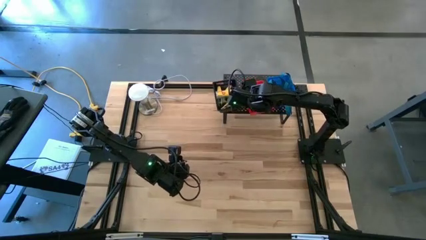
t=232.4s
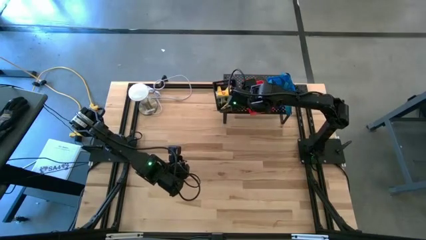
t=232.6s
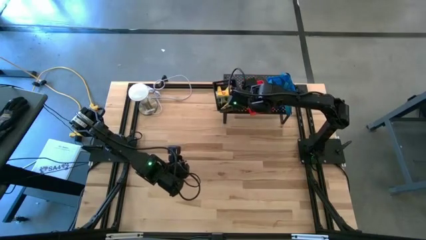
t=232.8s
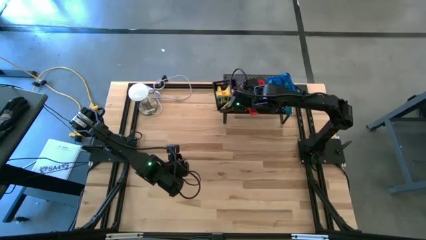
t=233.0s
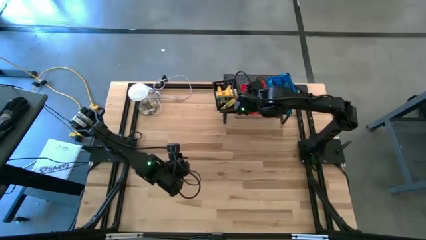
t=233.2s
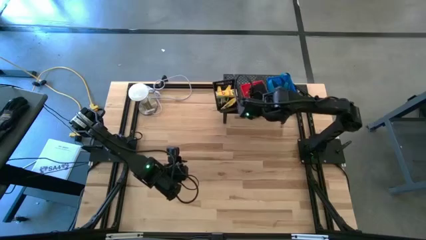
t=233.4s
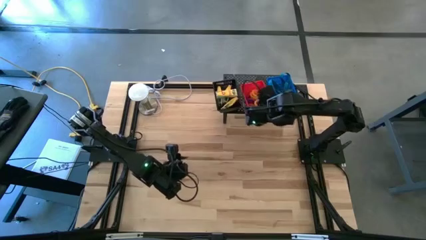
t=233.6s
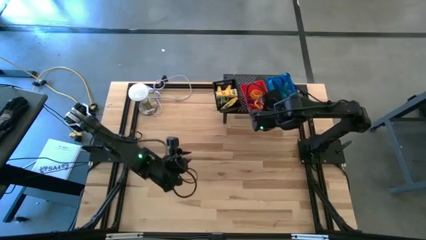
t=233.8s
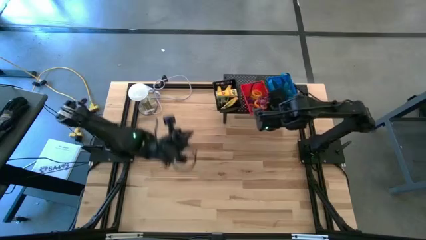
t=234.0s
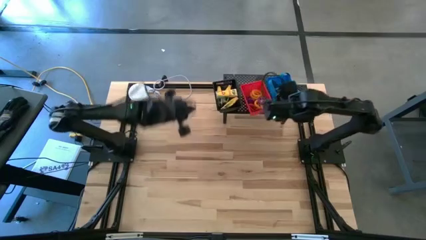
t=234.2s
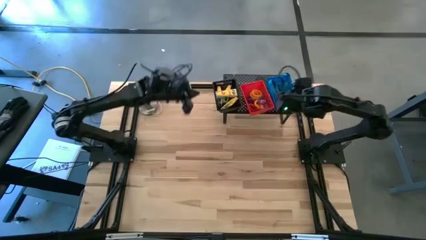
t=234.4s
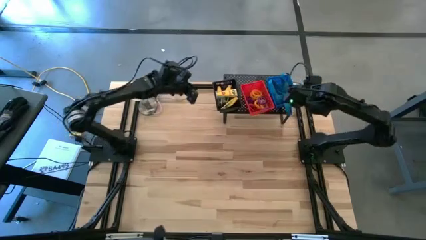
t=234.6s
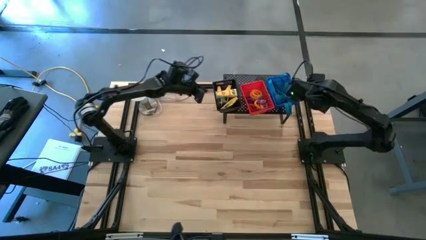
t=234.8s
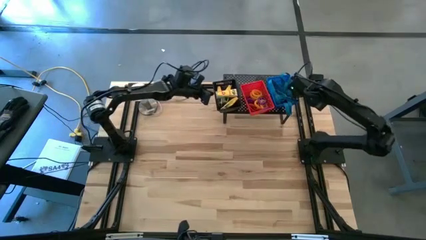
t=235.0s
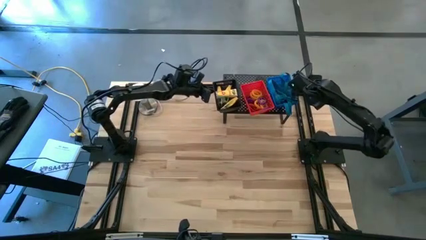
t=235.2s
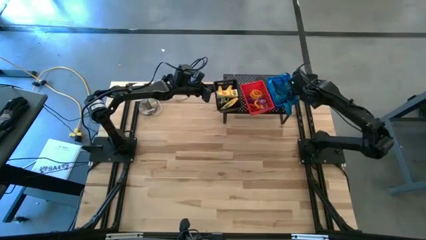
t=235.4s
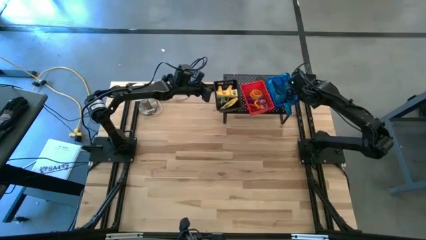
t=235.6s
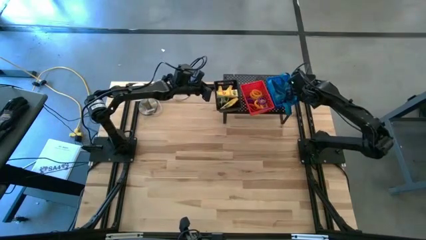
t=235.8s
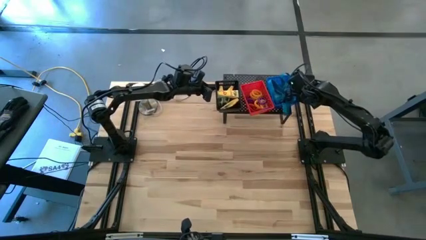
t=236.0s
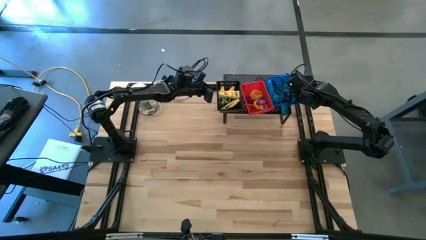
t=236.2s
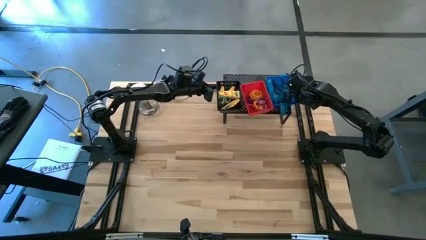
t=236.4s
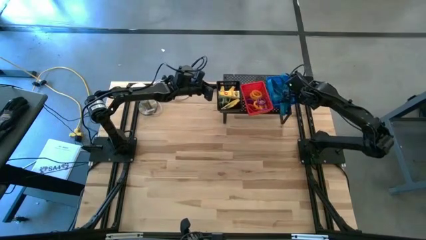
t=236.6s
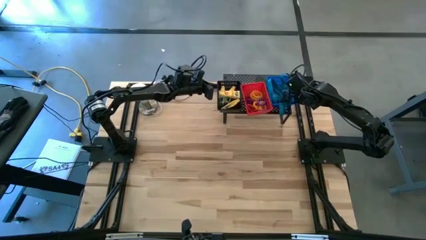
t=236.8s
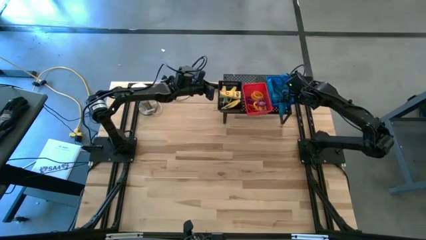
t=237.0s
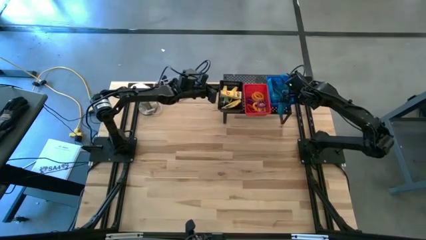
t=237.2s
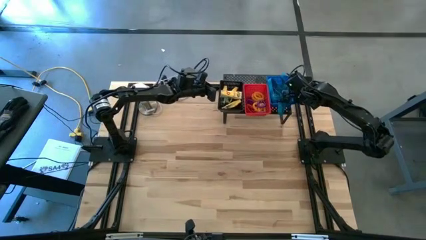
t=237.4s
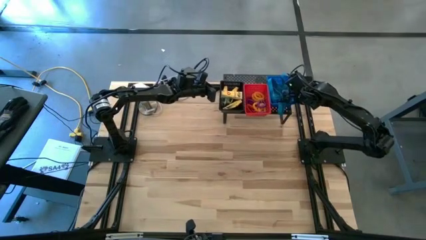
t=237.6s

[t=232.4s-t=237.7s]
Task: Pick & Place Office Desk Supplies
Adjust the black and blue bins in the shelf

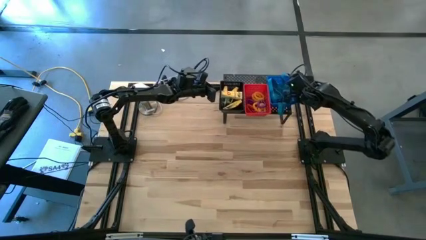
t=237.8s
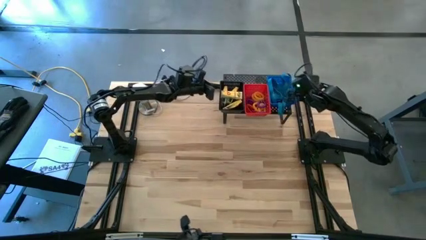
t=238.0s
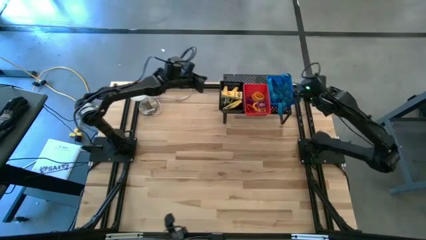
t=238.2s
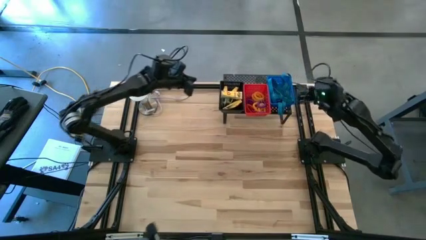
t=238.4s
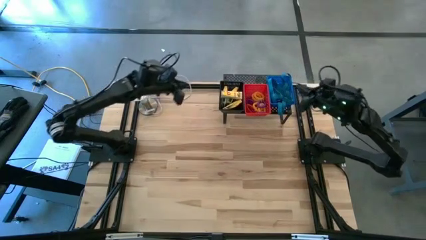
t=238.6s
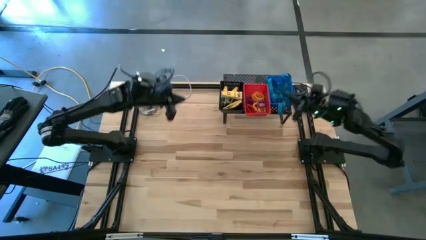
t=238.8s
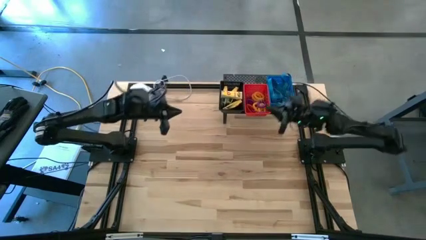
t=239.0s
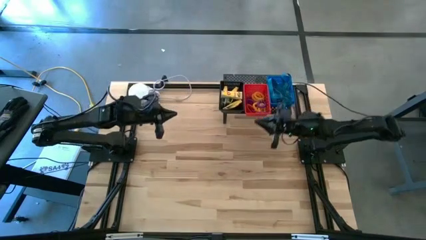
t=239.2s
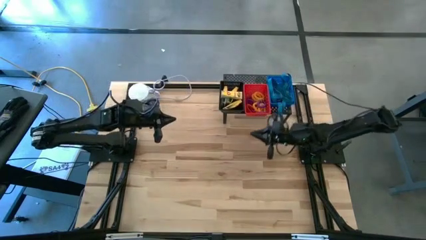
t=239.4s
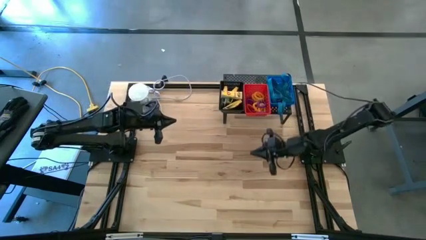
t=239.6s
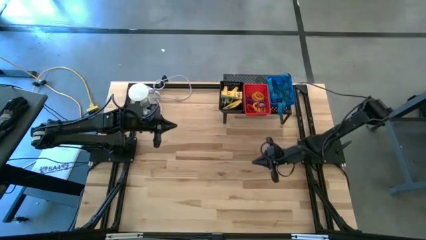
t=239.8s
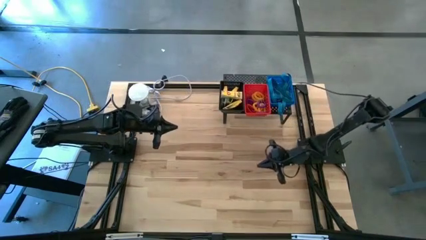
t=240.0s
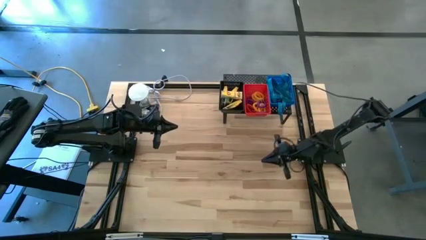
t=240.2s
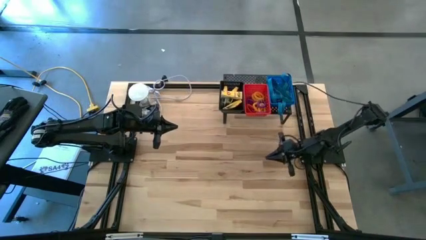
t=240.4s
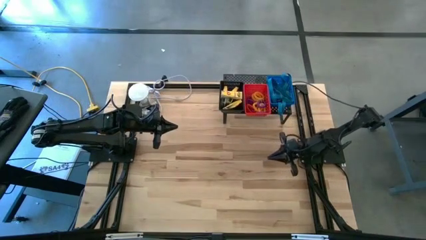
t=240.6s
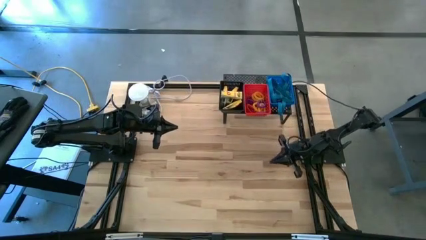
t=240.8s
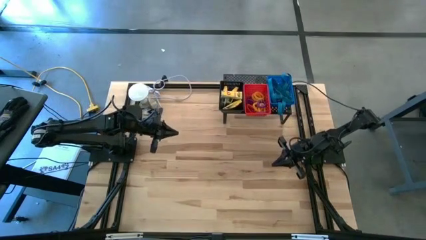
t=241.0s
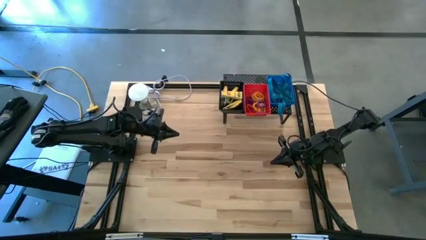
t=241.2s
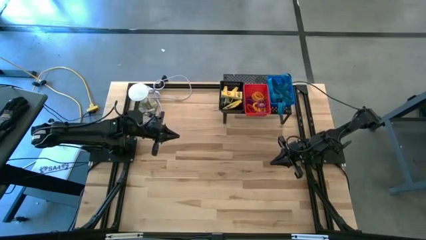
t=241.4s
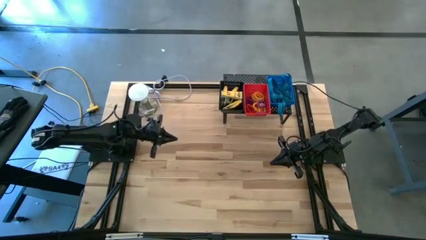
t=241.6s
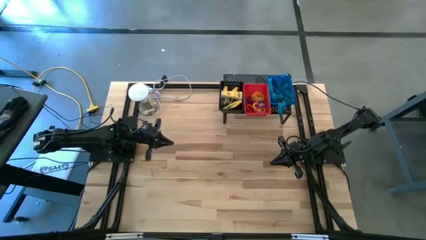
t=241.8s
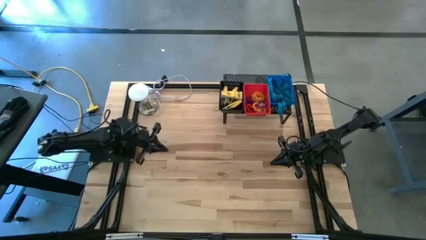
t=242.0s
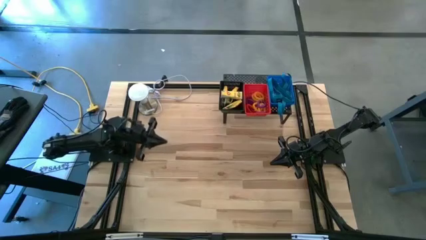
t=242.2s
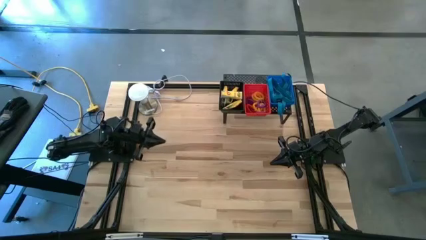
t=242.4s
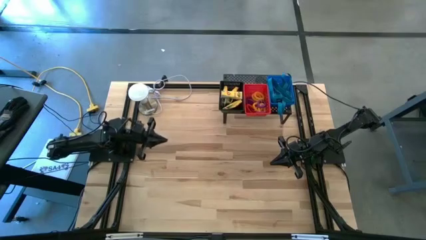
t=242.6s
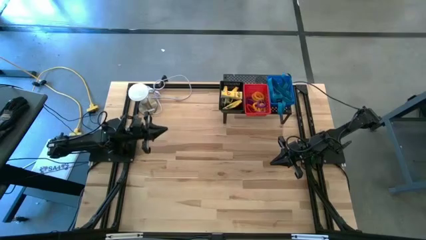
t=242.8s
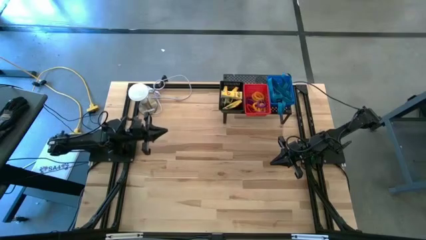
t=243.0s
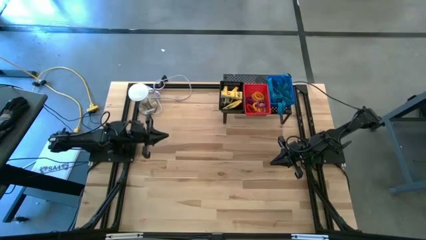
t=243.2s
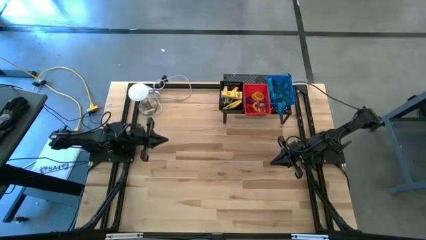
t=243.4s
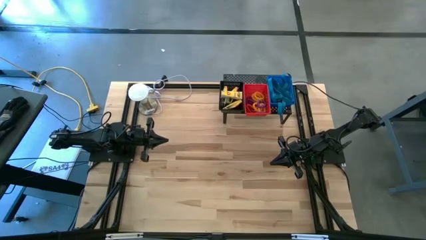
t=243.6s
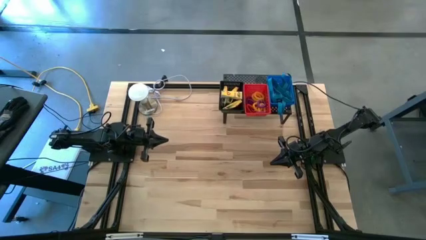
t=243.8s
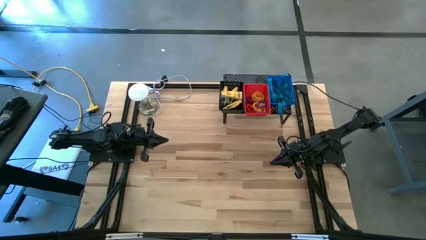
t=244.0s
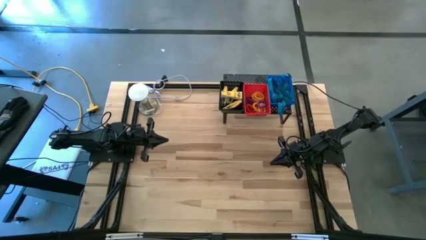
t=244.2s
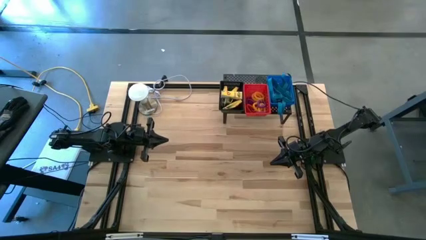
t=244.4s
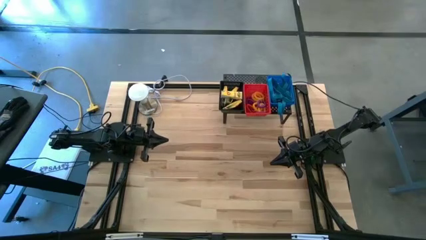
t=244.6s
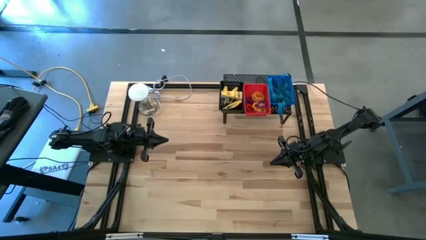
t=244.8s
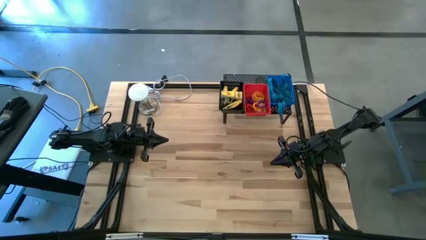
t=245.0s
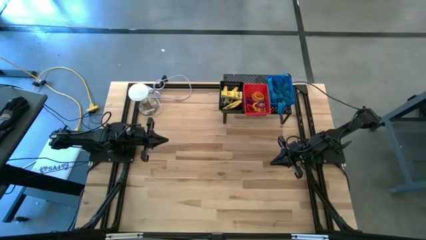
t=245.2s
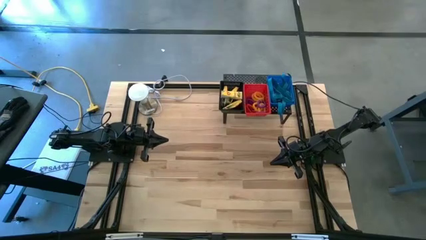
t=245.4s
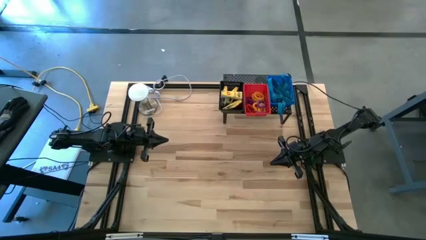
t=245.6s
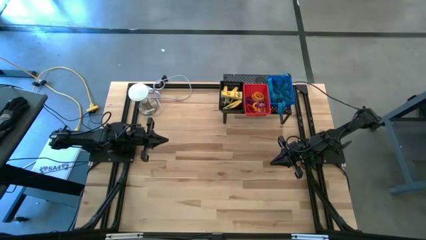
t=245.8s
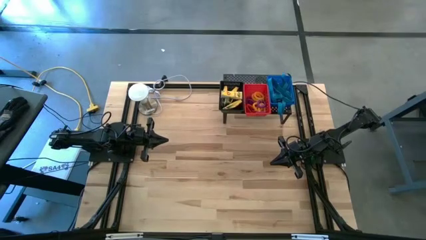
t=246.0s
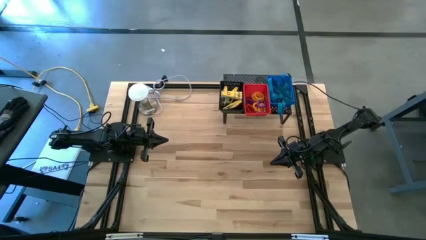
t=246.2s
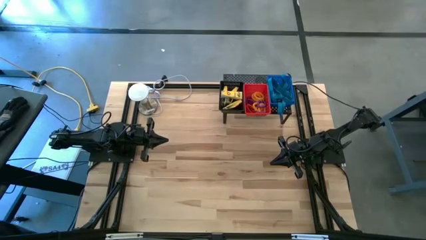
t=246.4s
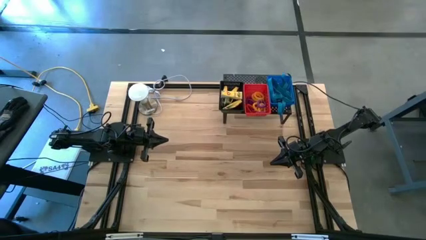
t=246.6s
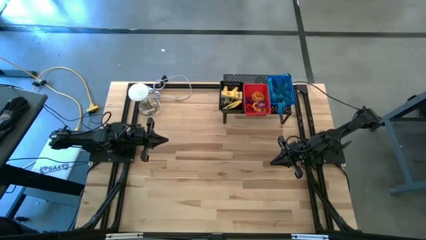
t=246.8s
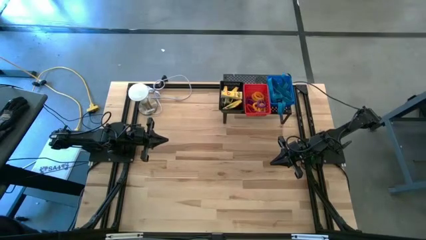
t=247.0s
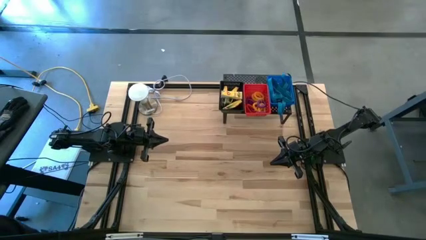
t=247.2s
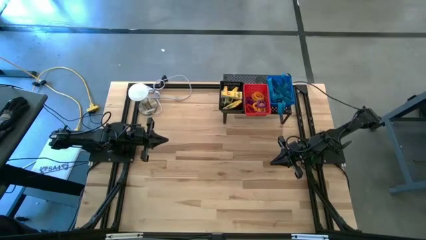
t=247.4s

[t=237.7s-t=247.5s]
Return to Home Position
